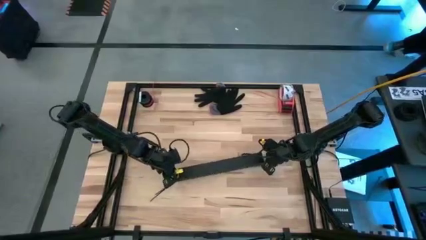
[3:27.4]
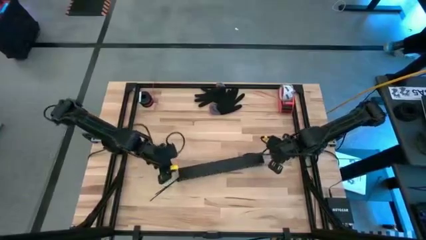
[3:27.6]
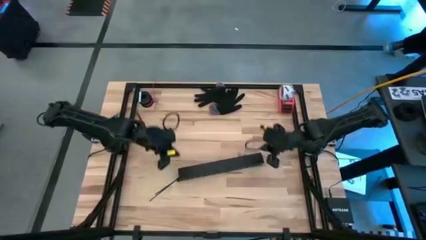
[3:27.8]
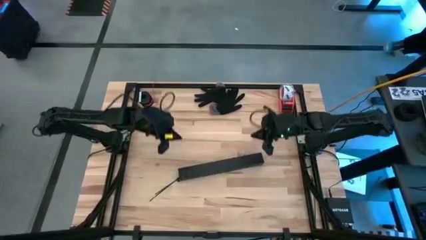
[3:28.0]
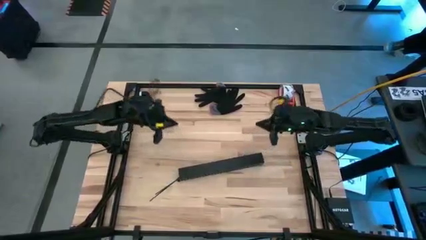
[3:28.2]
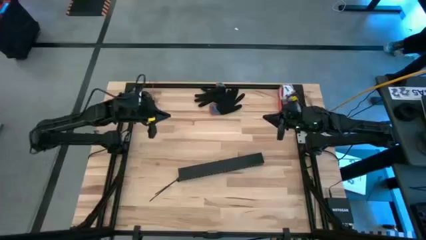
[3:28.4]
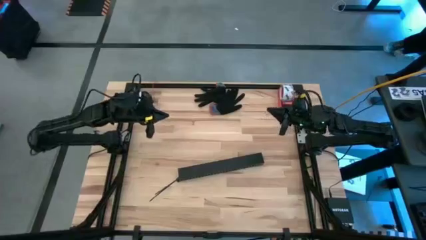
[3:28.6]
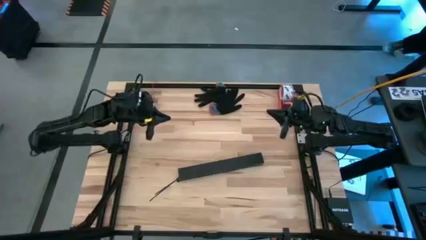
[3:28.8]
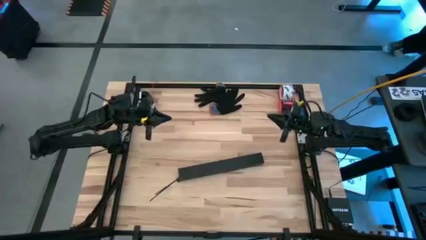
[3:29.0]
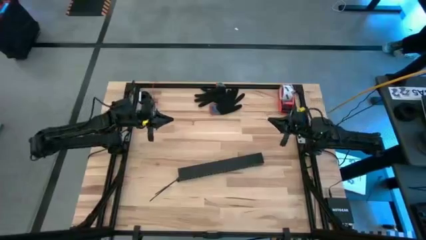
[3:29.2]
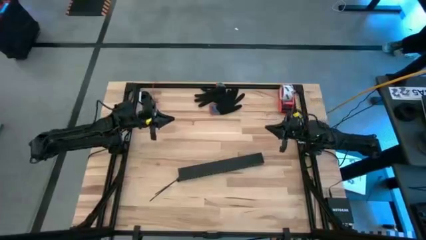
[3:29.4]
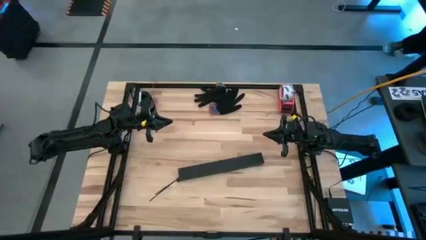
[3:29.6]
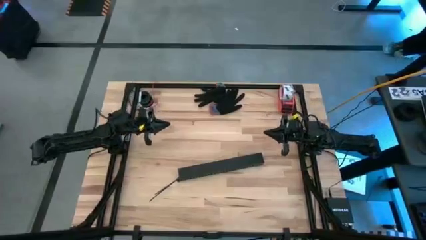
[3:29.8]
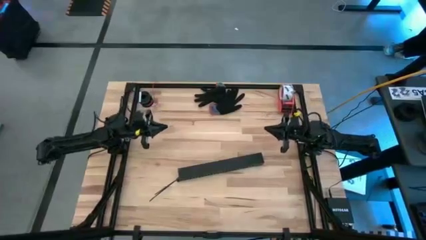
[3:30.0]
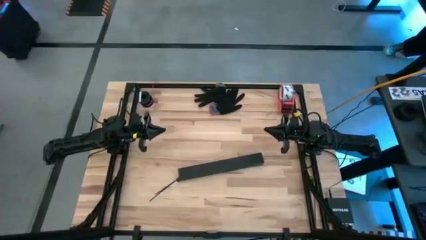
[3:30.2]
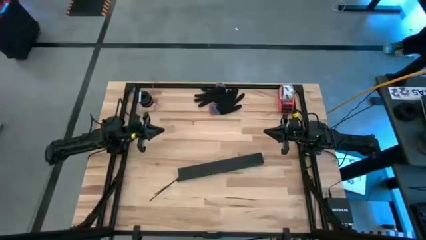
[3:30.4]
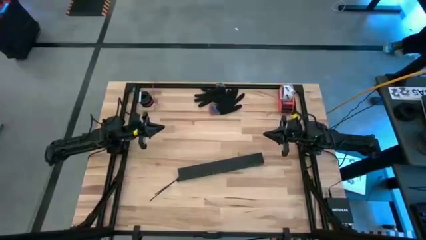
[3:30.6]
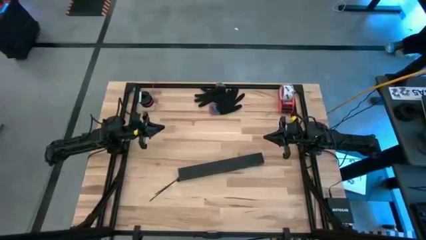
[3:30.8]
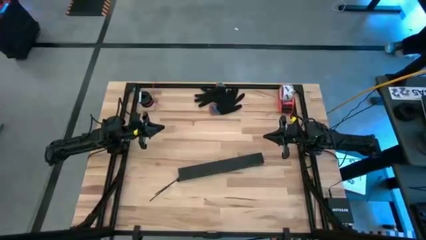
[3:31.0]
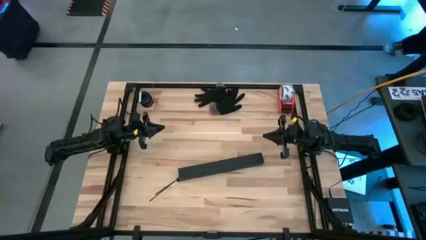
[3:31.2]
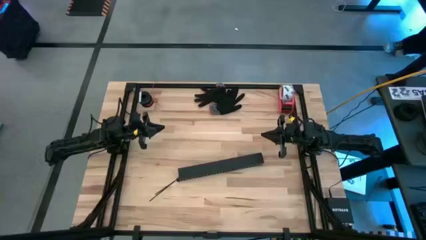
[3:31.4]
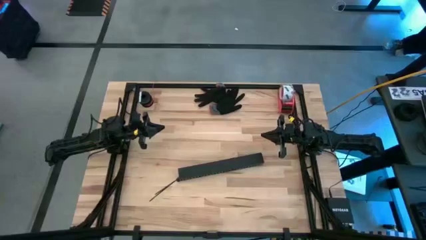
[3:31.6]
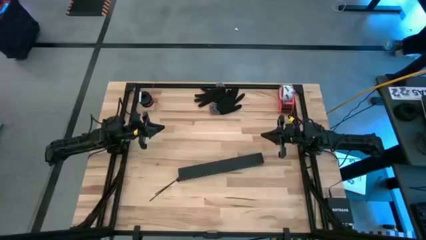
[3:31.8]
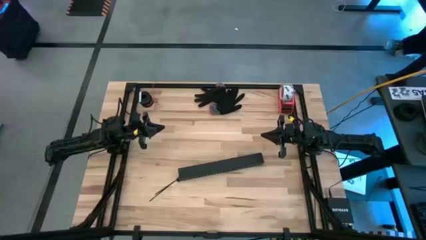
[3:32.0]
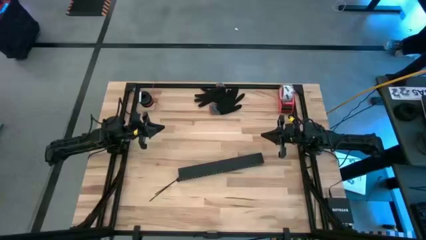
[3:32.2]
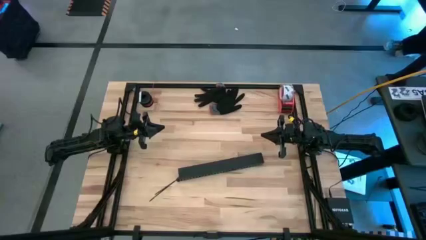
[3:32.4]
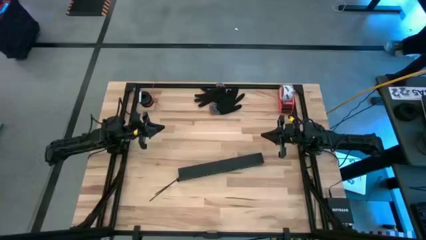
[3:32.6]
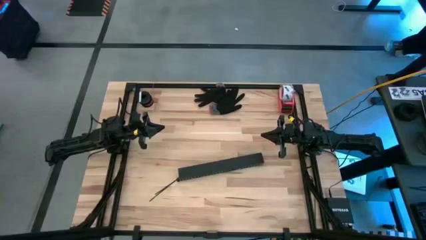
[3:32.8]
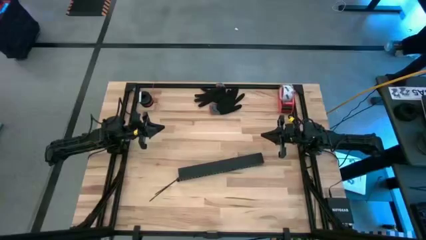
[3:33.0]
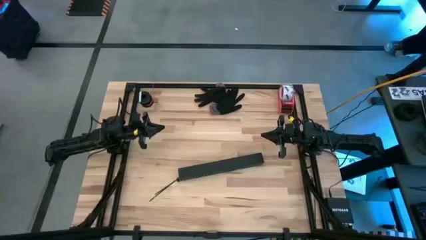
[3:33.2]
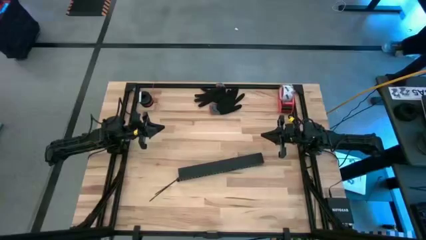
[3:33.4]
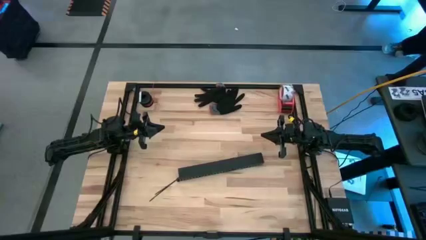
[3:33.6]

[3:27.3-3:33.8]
Task: Ziptie cables
Return to Home Position

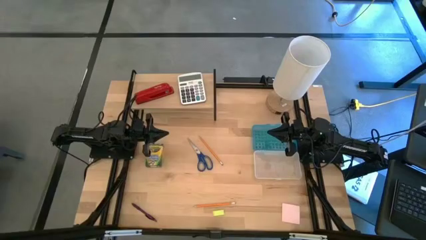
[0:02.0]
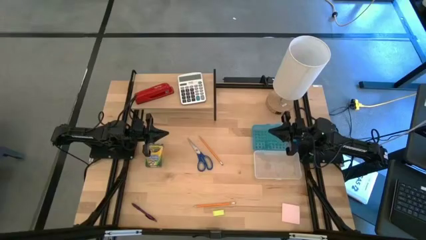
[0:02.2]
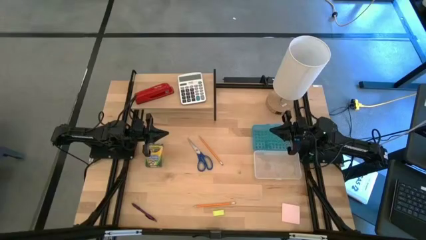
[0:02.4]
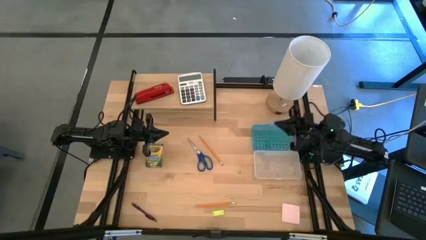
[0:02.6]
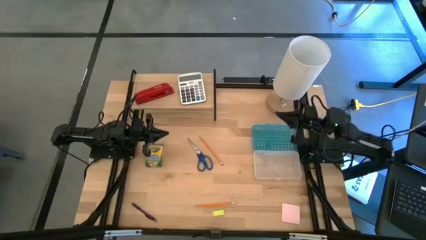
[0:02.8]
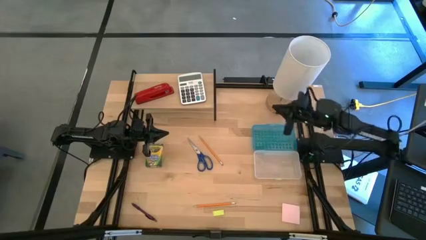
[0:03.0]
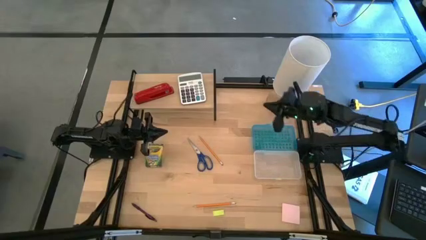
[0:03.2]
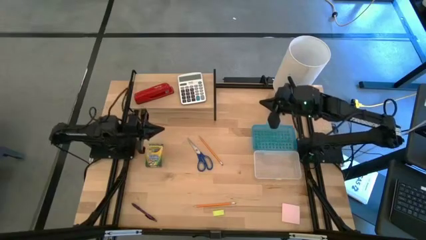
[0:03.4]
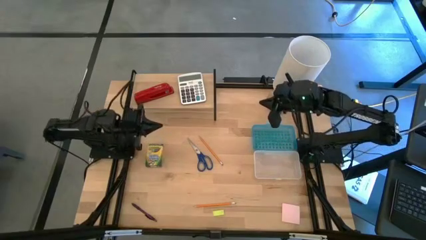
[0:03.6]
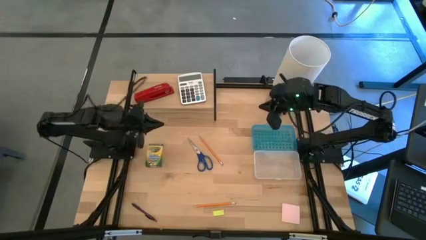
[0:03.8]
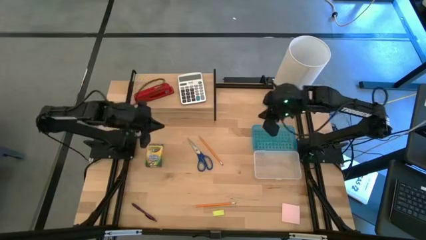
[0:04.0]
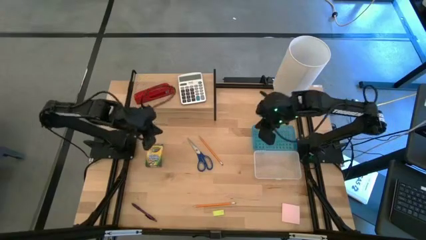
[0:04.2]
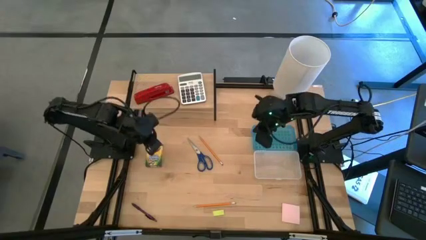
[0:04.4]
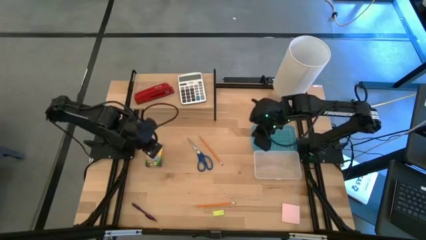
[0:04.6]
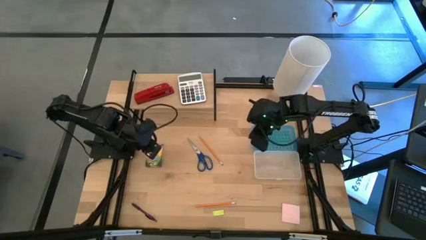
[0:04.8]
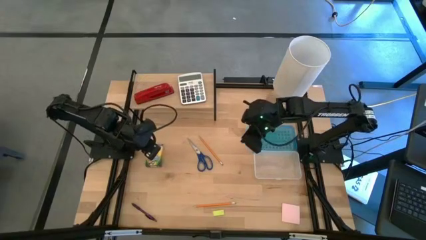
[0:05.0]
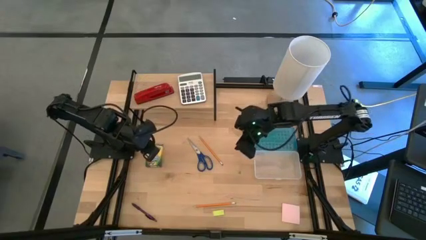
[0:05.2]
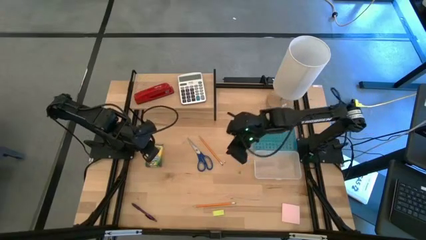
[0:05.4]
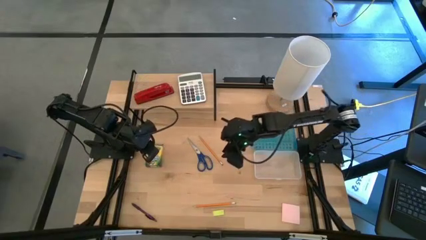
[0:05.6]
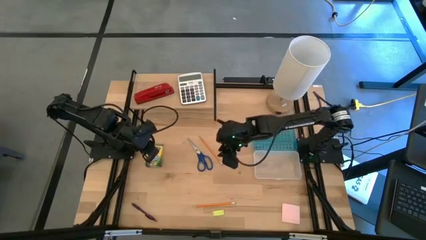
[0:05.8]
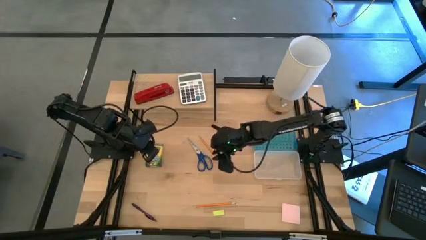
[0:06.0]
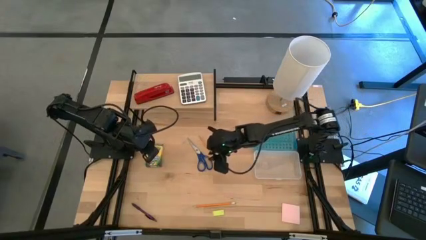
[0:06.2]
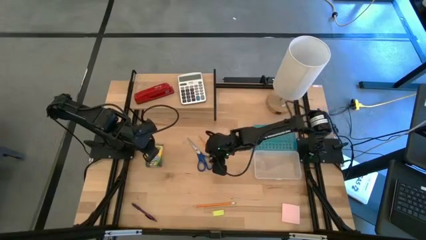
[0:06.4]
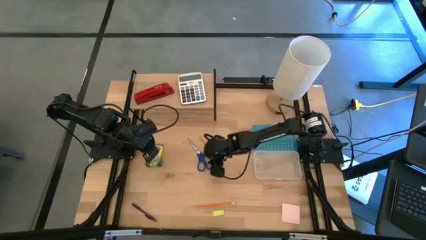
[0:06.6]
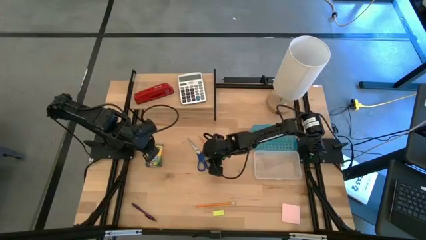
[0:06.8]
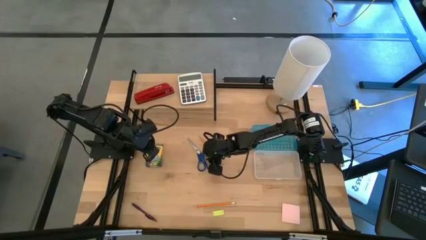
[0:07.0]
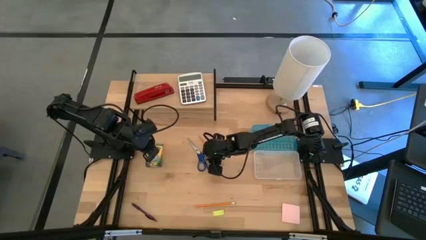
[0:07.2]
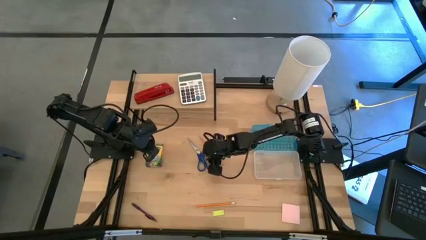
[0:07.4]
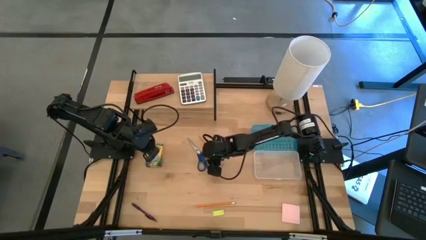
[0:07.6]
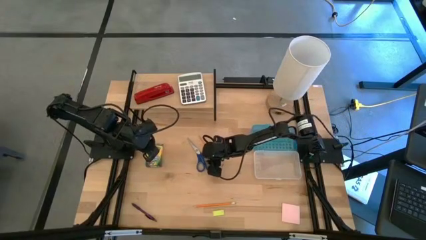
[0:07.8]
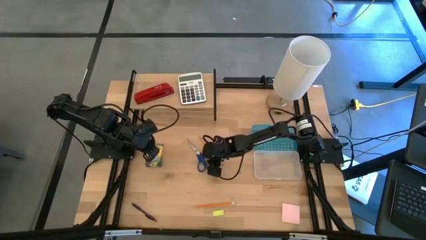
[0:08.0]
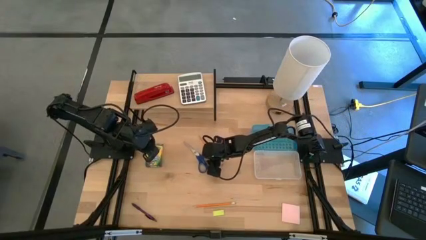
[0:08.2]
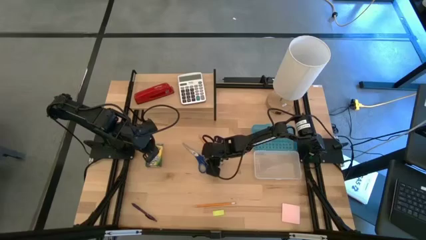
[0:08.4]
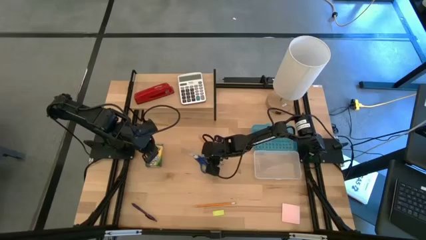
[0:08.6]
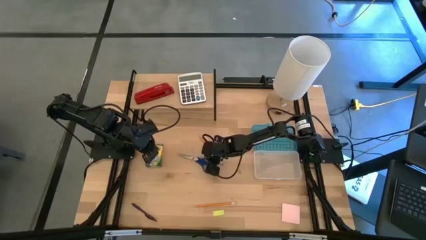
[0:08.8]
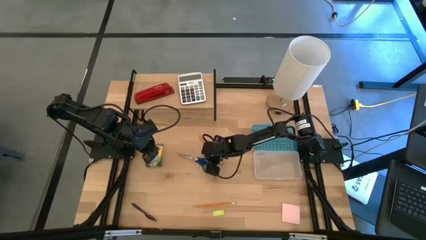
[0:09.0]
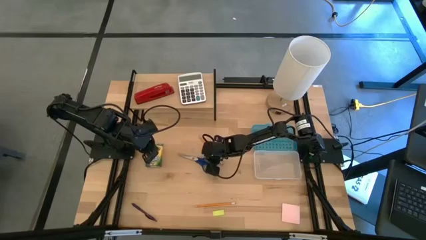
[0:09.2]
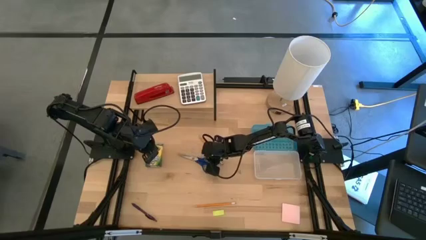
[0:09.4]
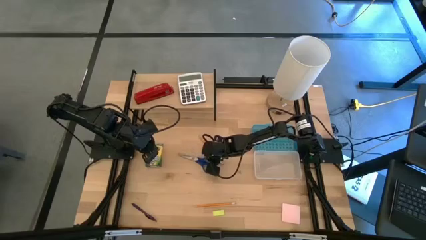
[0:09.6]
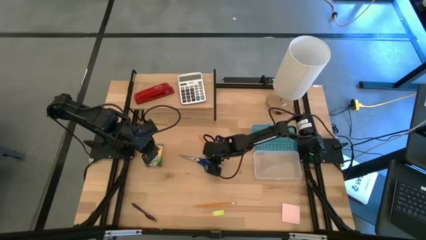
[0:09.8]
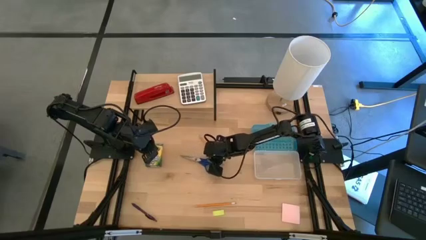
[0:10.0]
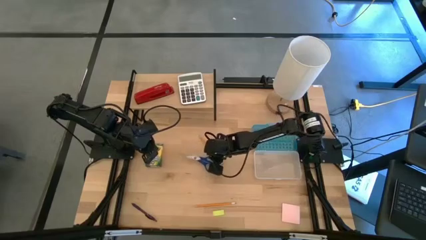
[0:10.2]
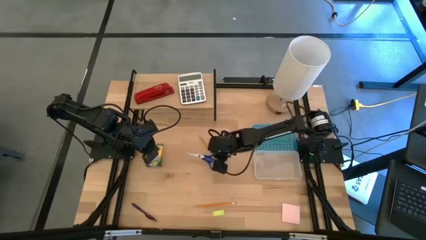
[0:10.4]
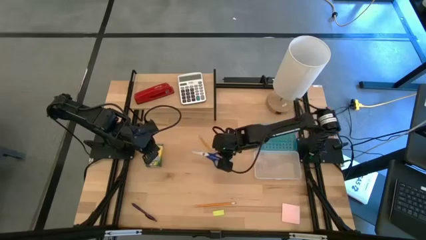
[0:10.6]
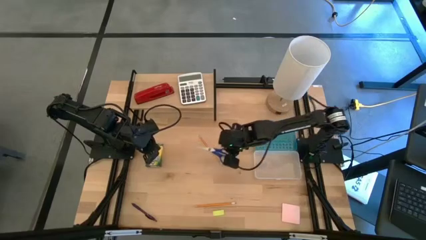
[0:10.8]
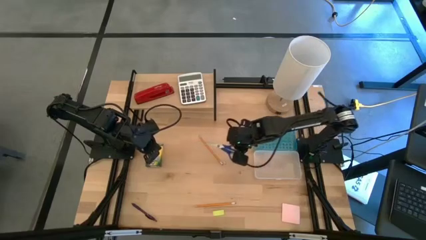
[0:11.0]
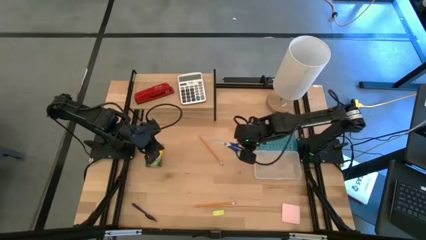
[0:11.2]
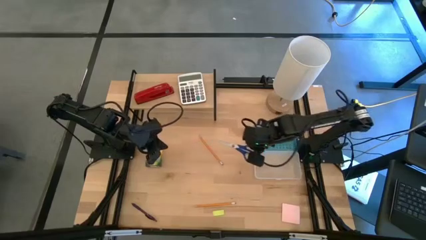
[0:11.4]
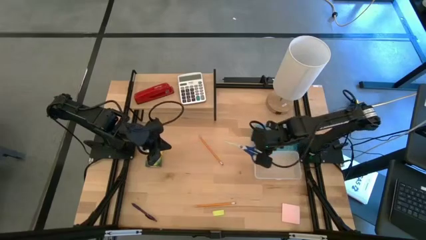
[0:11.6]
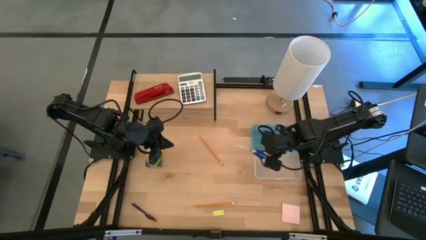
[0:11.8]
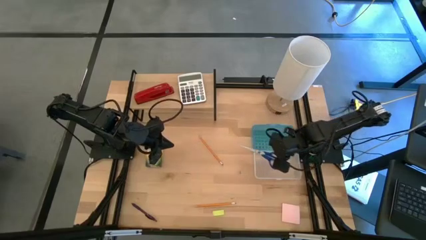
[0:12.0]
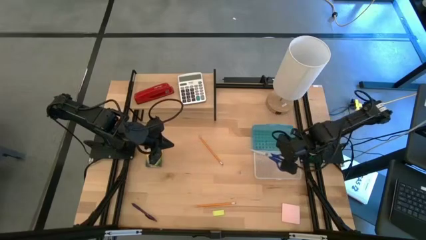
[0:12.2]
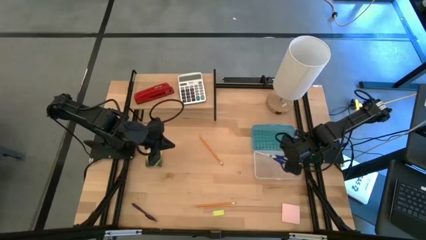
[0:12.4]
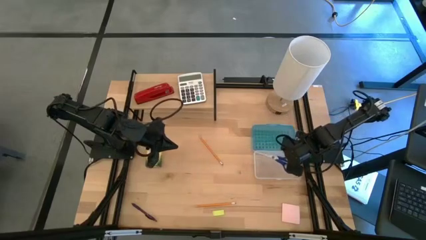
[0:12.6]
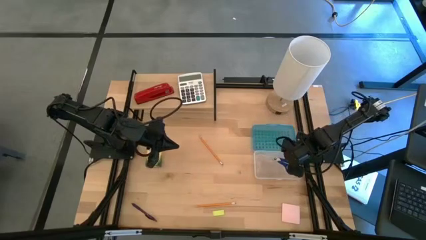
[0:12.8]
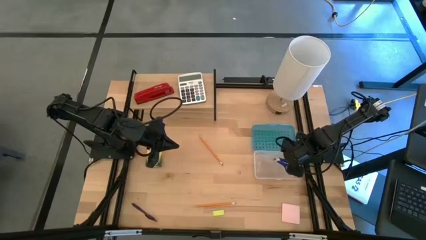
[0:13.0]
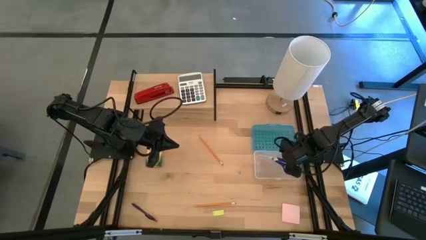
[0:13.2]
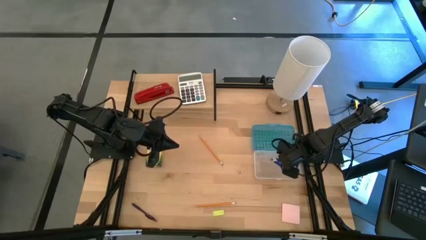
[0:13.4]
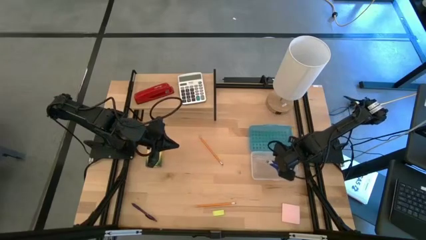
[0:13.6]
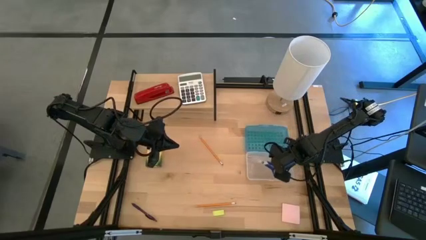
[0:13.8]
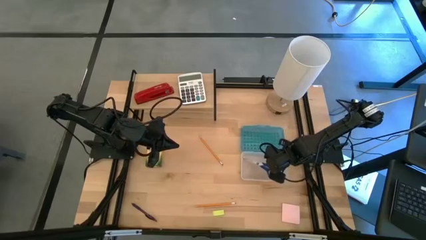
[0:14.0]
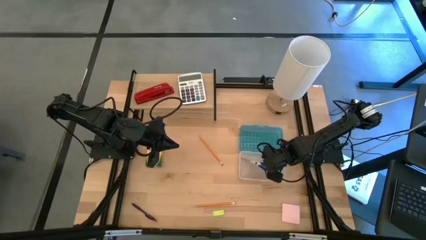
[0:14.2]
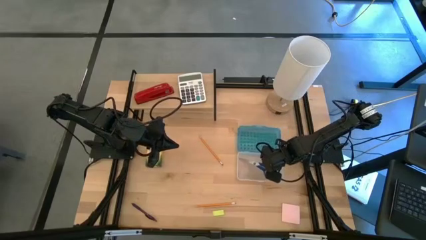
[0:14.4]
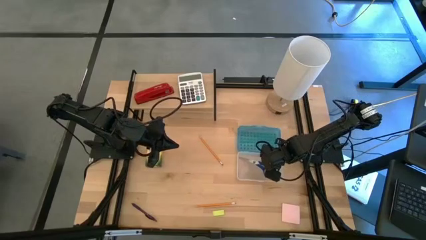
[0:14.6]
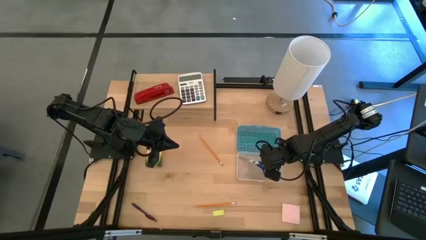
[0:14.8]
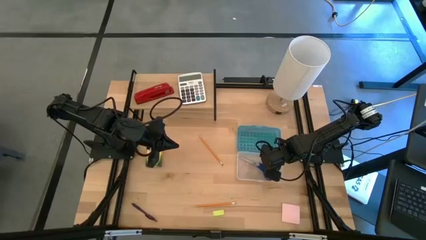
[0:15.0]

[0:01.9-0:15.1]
Task: Pack school essentials
Put the blue scissors into the blue supply box
